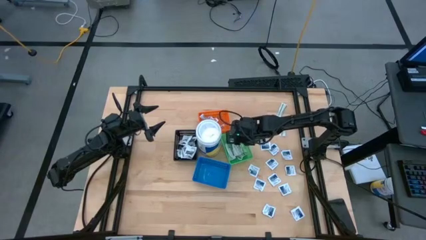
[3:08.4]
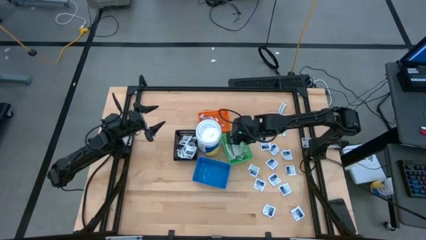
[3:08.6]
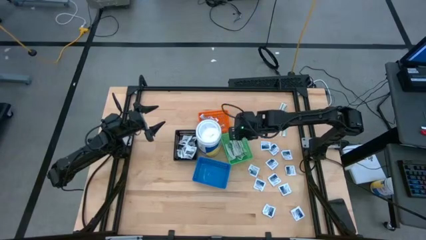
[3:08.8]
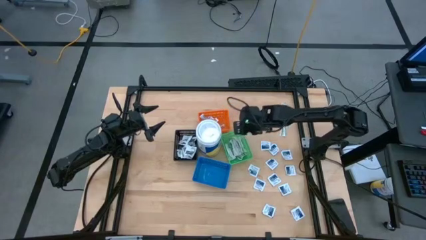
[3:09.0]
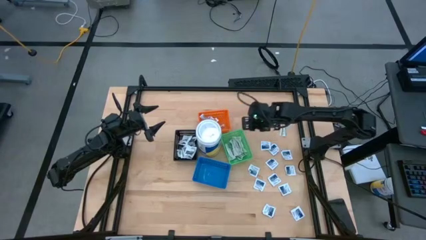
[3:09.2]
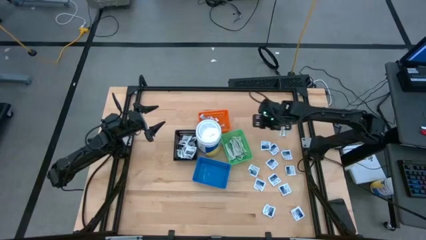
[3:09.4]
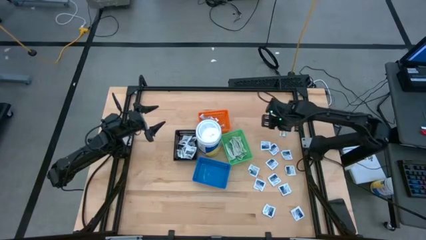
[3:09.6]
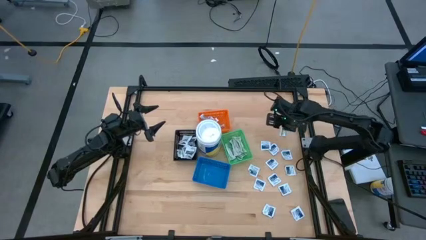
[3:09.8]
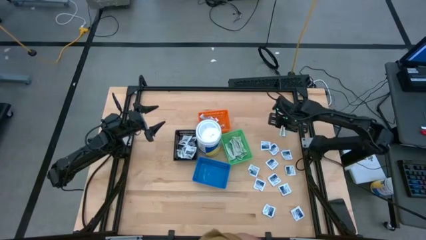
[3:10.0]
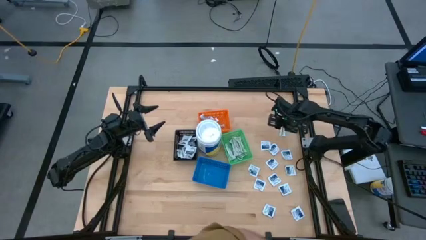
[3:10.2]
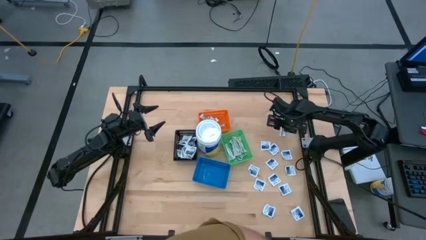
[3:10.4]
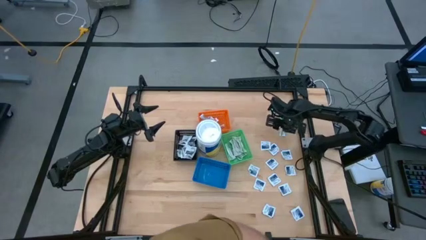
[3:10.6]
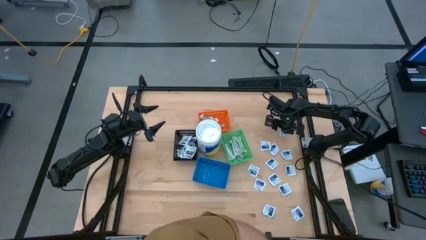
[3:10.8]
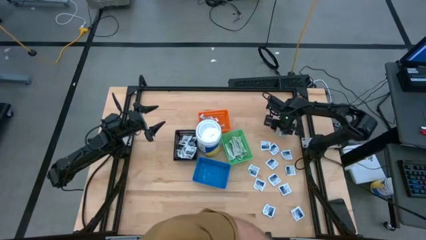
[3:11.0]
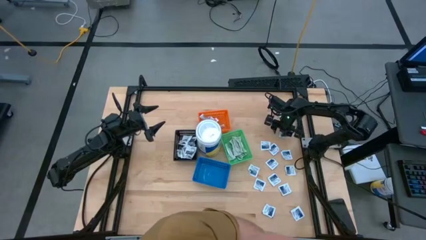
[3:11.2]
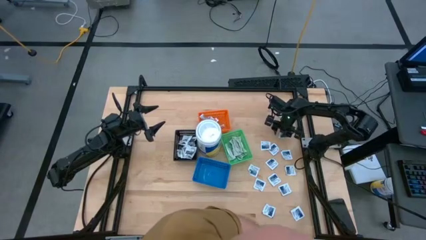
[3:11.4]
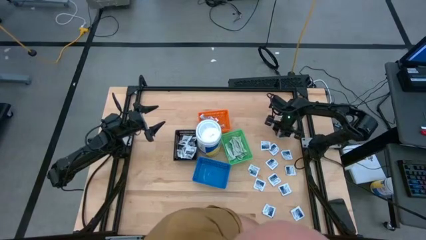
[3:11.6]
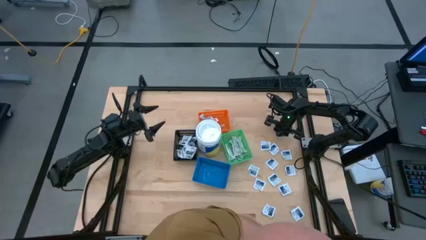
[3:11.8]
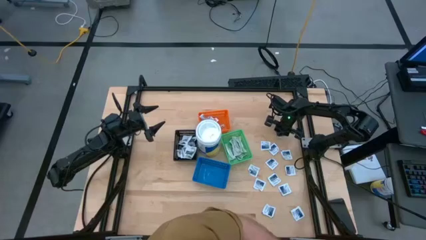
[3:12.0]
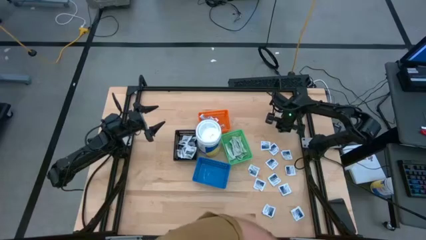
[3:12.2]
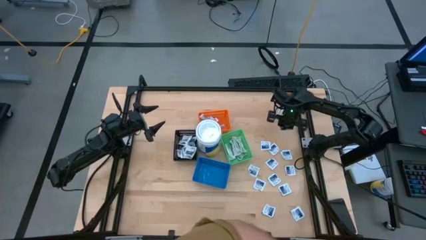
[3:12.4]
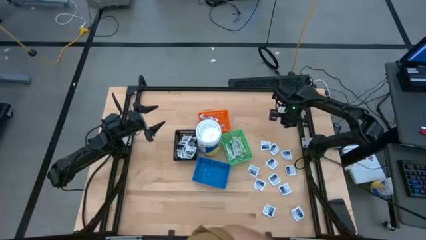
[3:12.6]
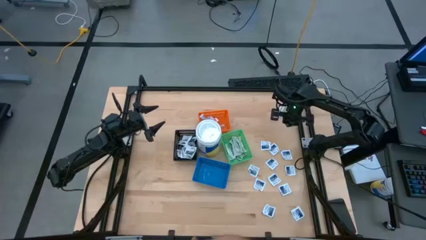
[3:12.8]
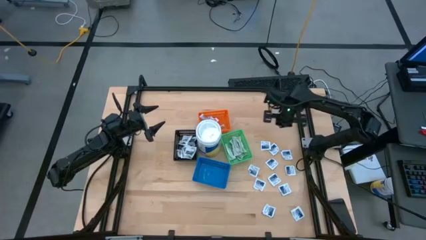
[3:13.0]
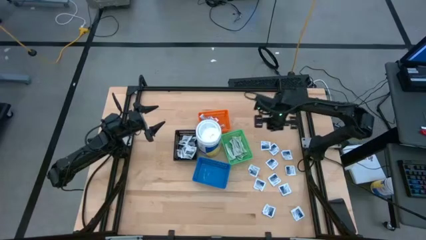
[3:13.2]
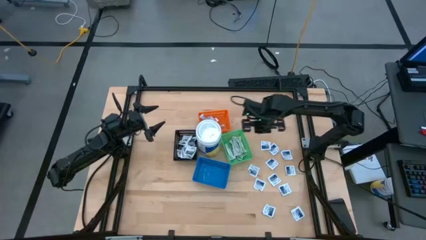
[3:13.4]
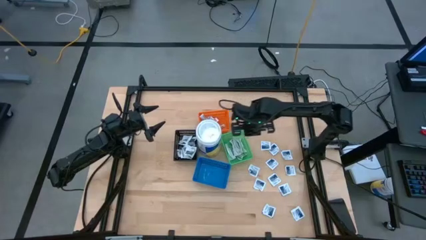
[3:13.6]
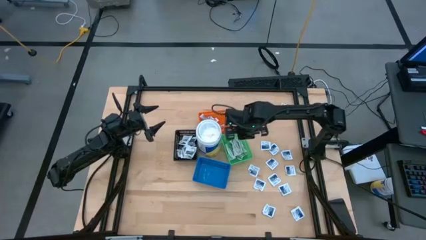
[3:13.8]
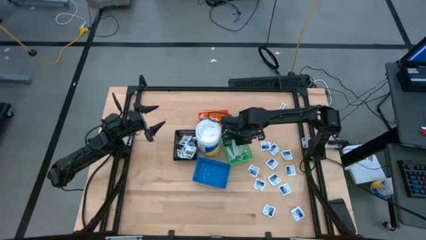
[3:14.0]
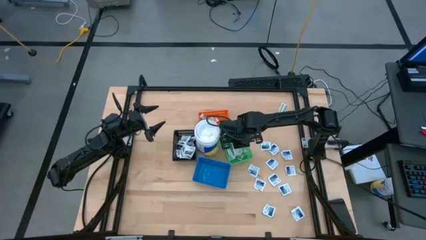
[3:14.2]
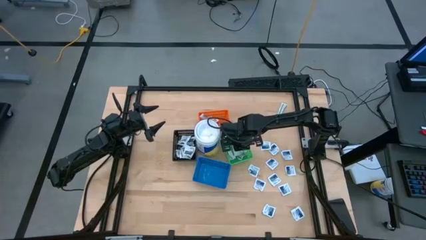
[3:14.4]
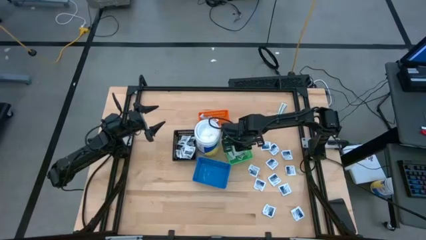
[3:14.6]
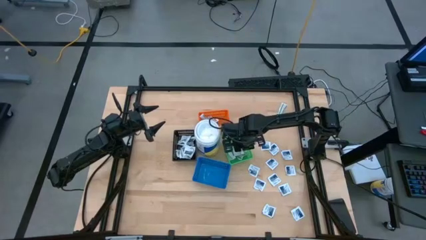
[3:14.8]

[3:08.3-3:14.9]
Task: Pick & Place First Aid Supplies
Put the green bandage pack into the green bin

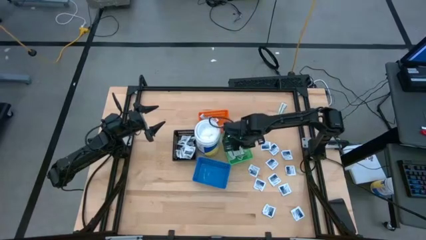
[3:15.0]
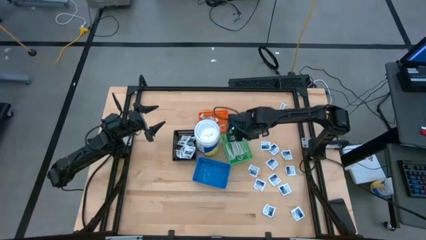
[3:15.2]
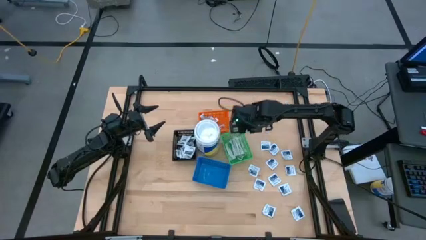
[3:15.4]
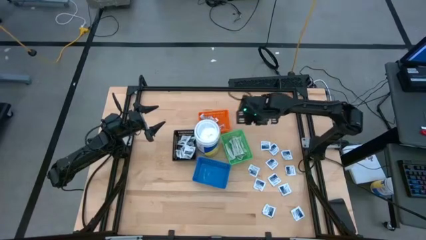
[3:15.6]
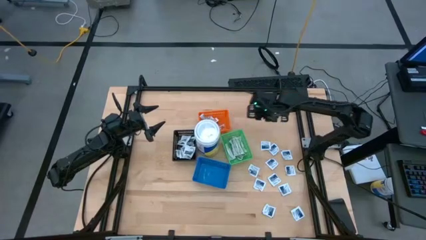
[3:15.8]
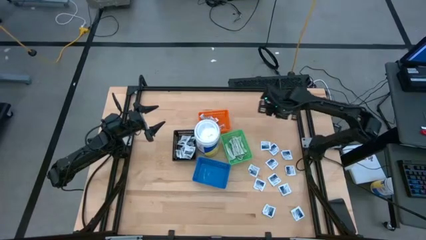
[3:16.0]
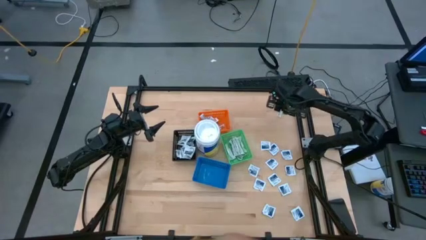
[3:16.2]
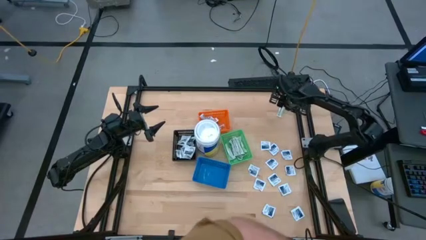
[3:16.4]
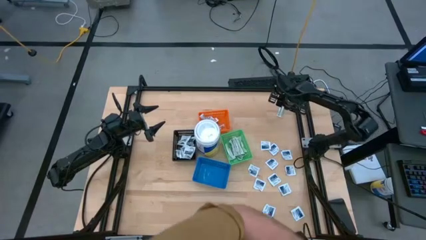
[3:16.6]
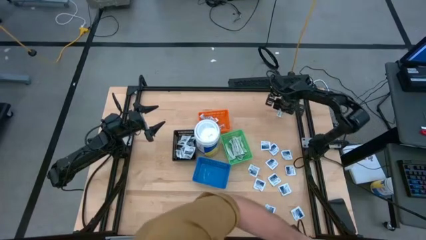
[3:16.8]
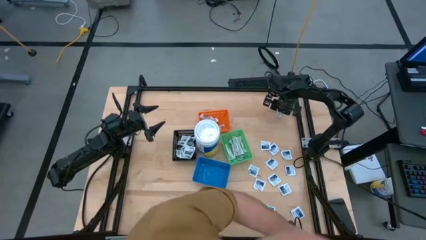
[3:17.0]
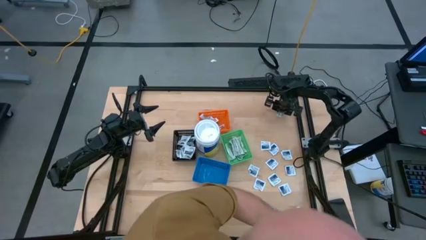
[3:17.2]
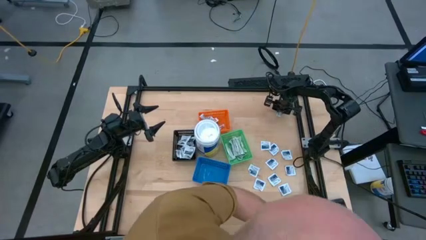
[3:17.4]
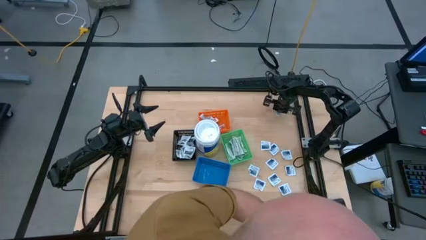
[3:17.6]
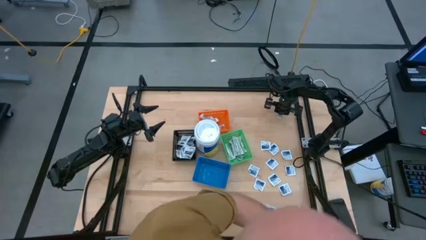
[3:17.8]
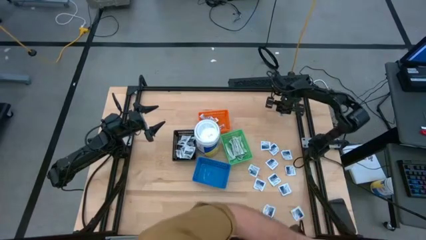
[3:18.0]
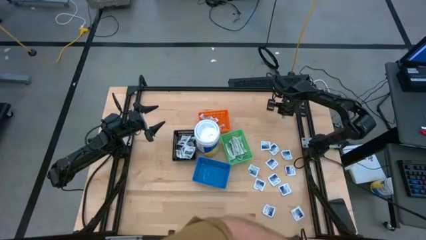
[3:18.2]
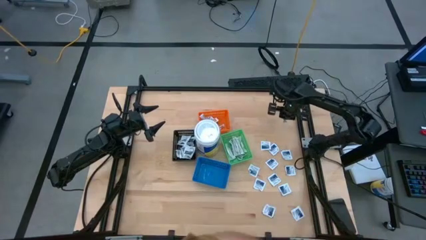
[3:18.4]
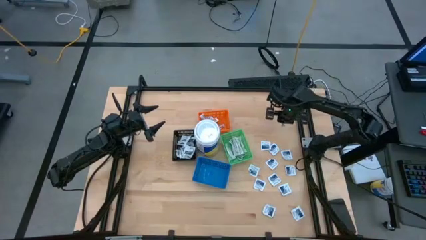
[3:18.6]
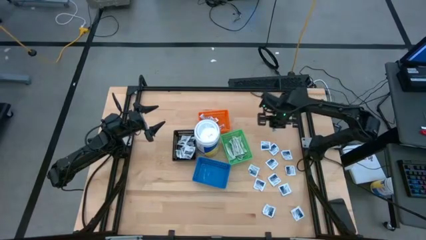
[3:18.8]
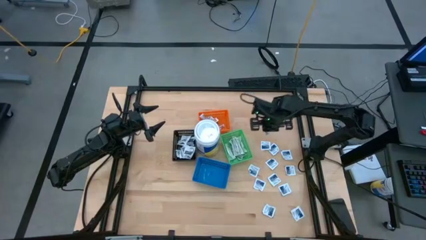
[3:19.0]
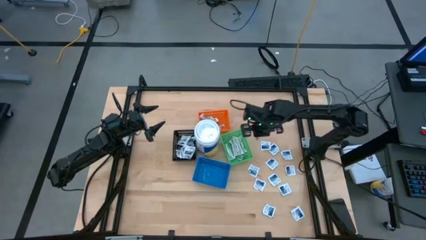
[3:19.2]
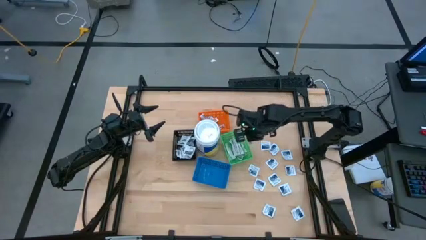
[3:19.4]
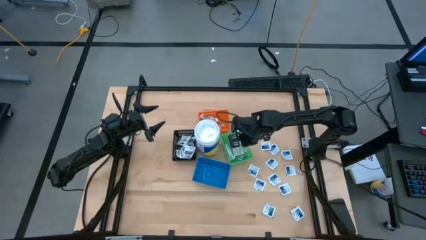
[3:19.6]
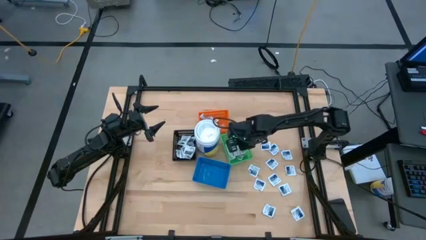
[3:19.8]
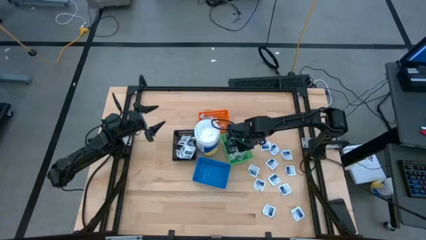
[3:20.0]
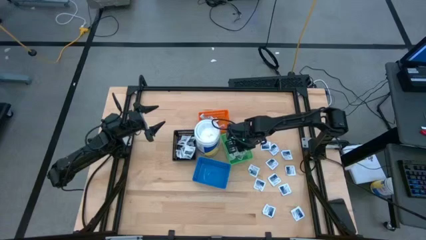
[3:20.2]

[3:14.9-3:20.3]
Put the green bandage pack into the green bin

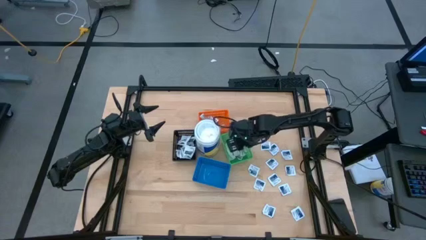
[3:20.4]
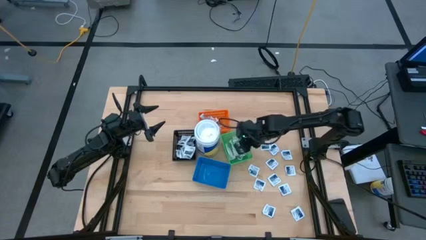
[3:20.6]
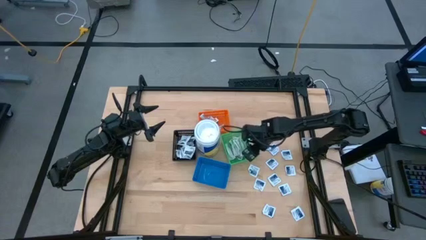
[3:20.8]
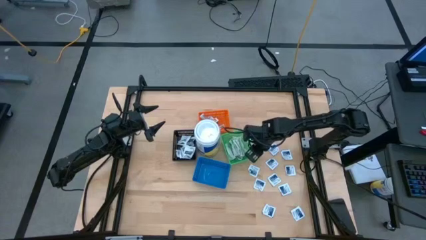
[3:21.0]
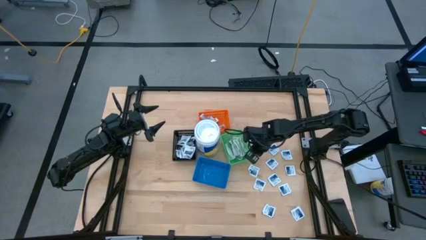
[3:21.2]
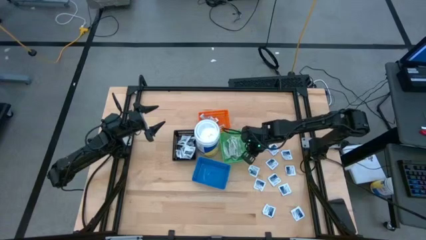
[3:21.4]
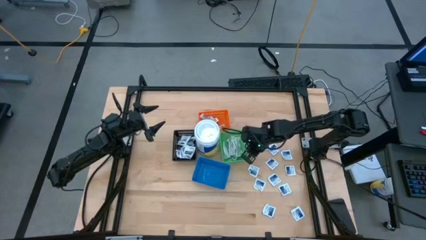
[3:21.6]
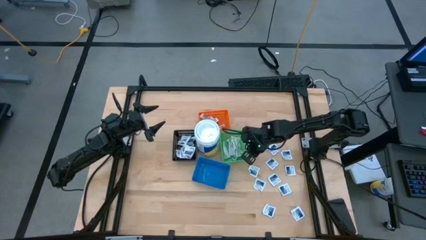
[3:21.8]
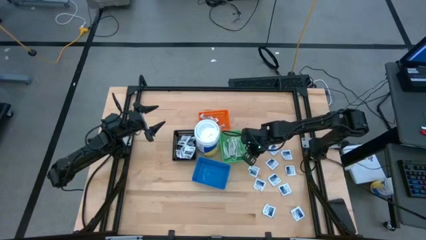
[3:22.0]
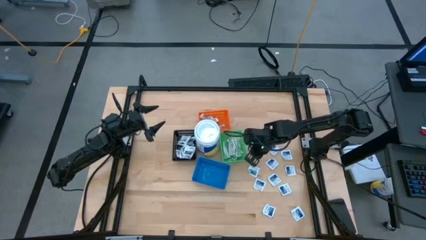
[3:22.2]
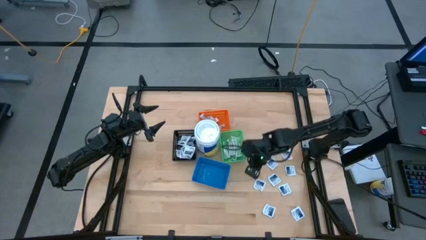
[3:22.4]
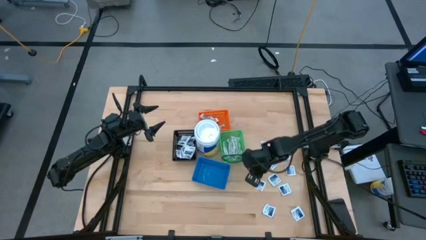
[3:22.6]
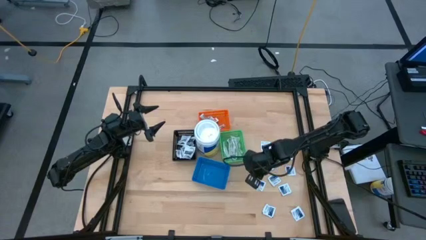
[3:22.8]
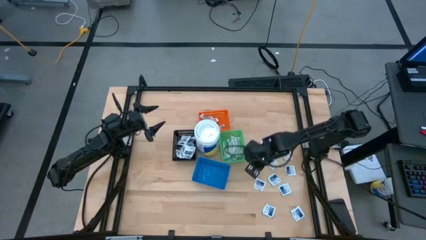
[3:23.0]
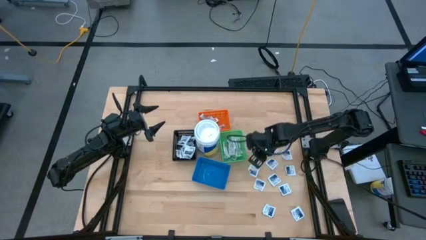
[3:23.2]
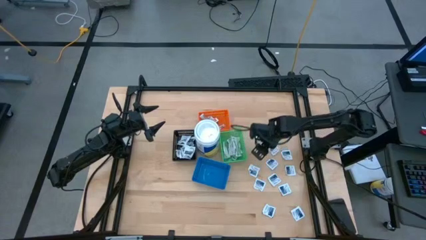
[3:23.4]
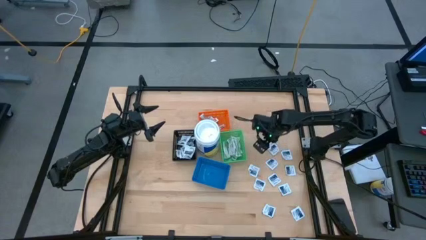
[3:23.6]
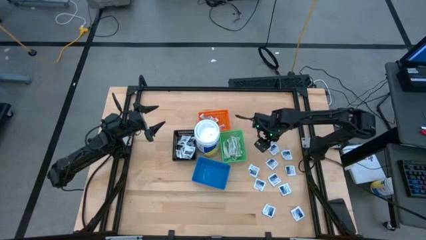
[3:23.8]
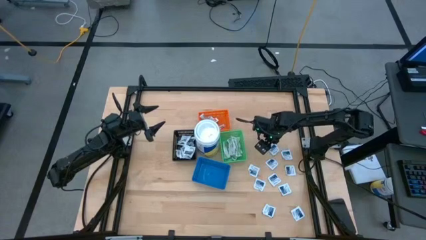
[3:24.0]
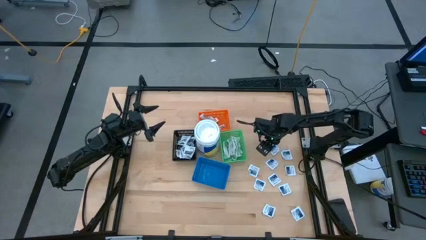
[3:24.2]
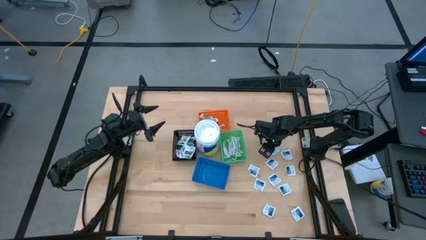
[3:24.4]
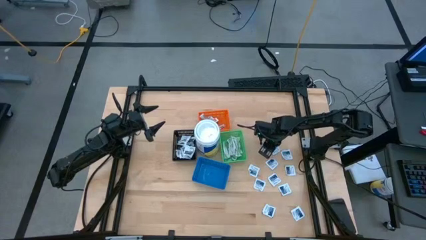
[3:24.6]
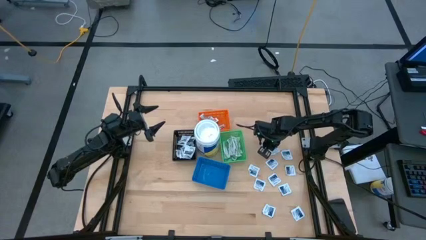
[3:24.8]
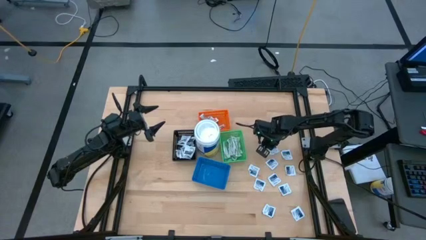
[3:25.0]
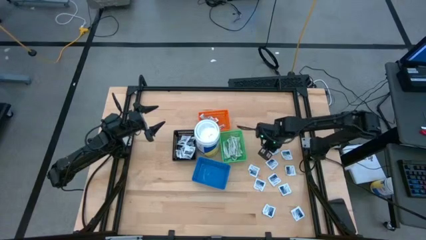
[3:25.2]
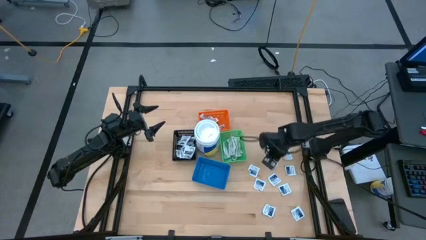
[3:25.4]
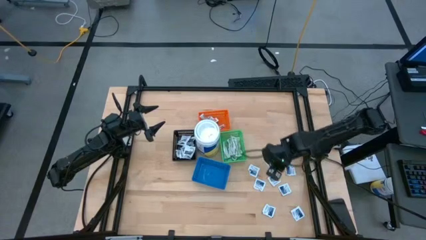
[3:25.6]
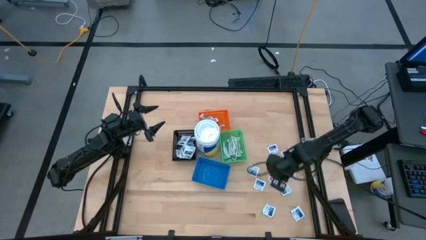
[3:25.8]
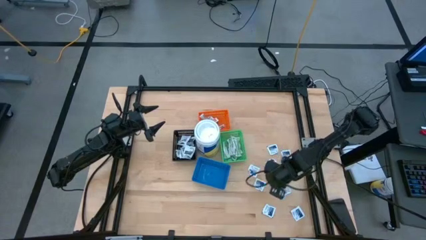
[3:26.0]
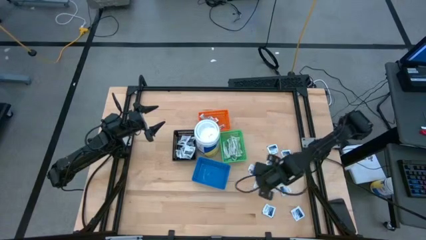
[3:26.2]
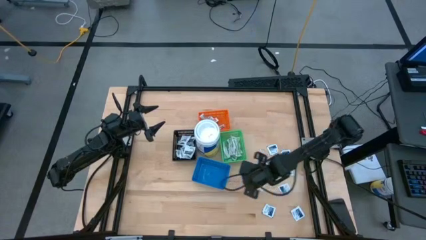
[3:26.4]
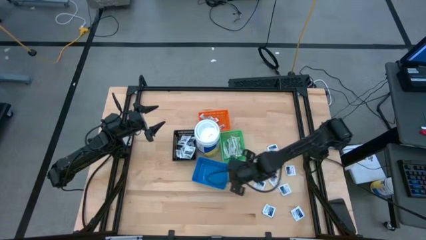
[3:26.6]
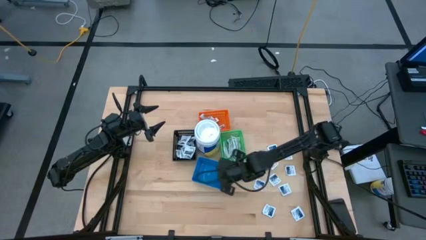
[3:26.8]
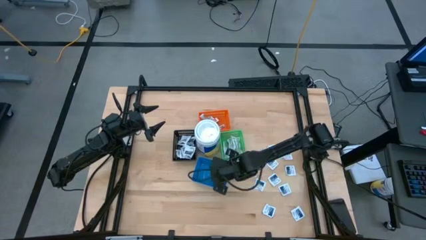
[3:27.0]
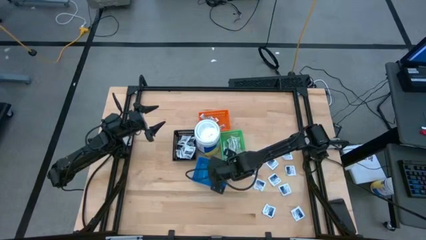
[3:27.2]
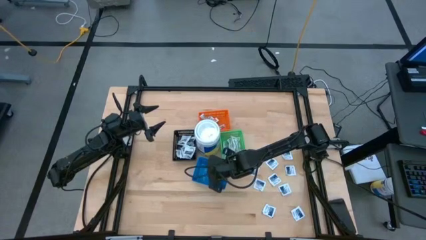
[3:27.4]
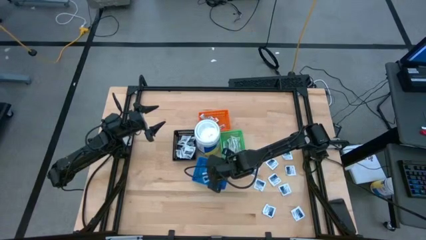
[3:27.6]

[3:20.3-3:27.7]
Put the blue alcohol pad into the blue bin
